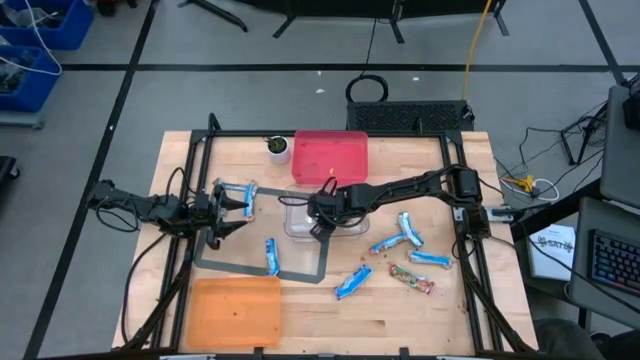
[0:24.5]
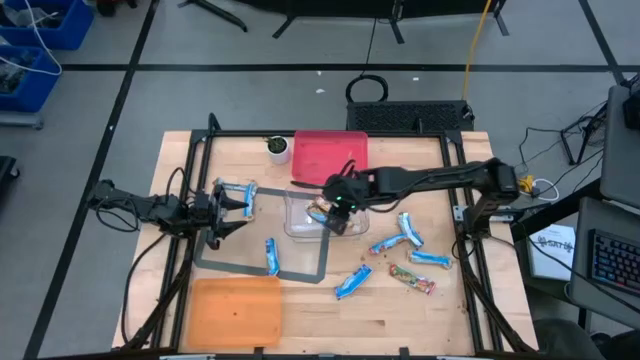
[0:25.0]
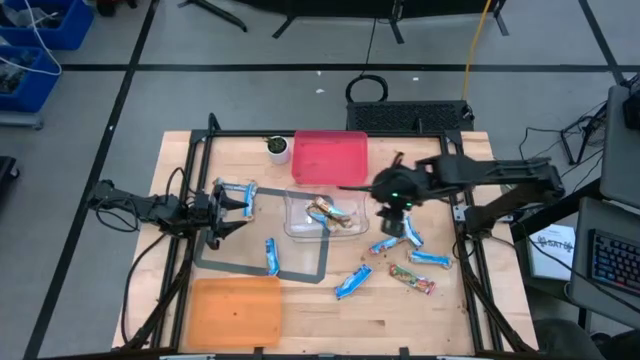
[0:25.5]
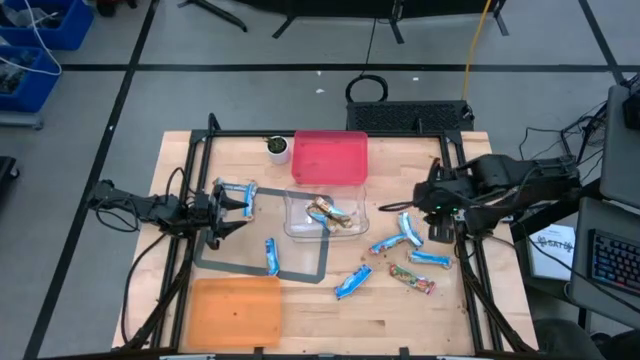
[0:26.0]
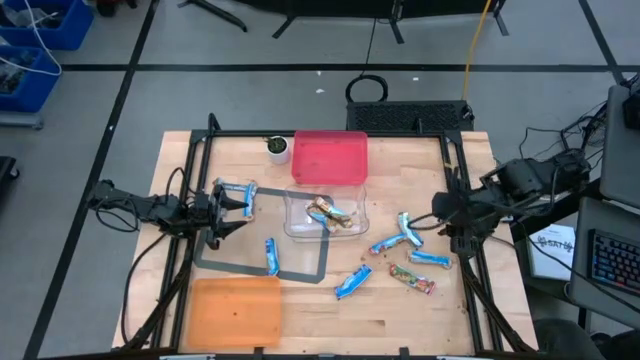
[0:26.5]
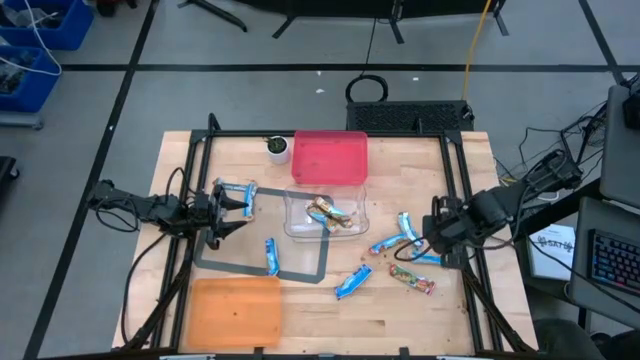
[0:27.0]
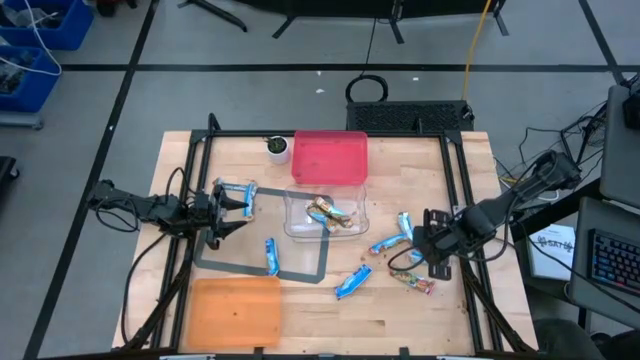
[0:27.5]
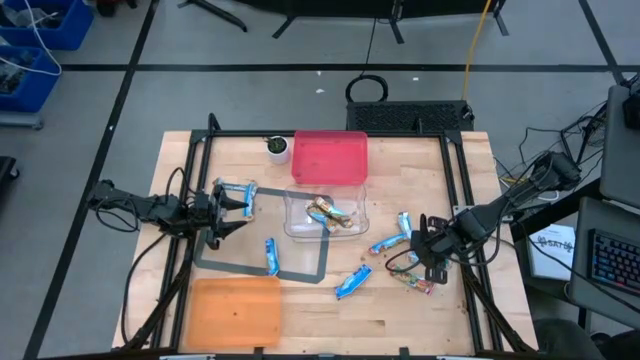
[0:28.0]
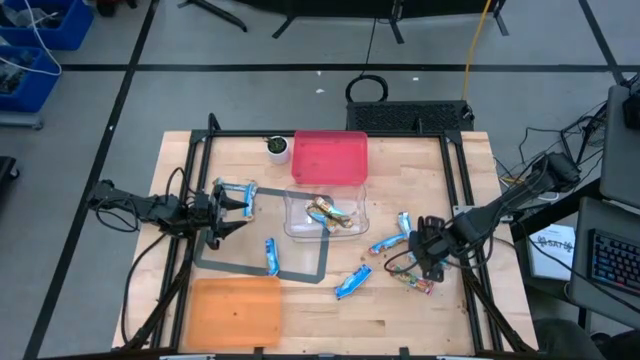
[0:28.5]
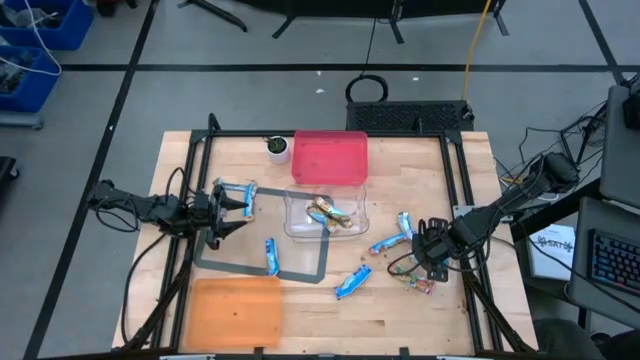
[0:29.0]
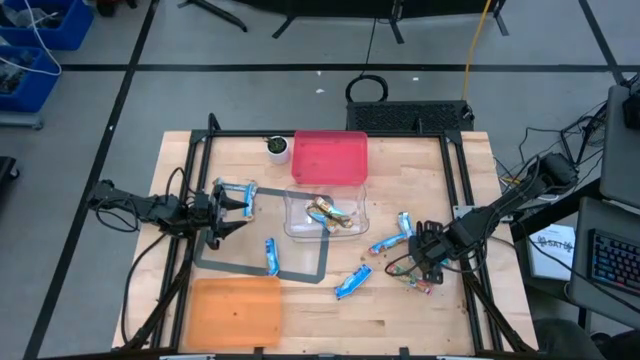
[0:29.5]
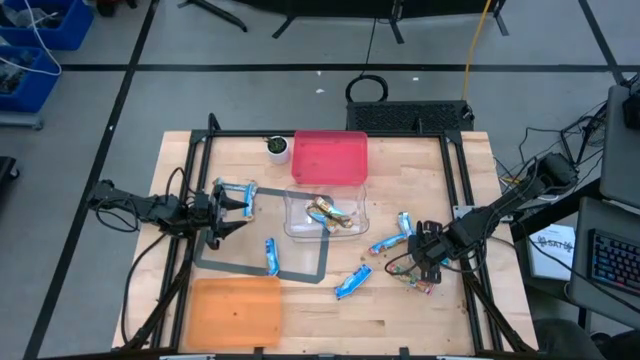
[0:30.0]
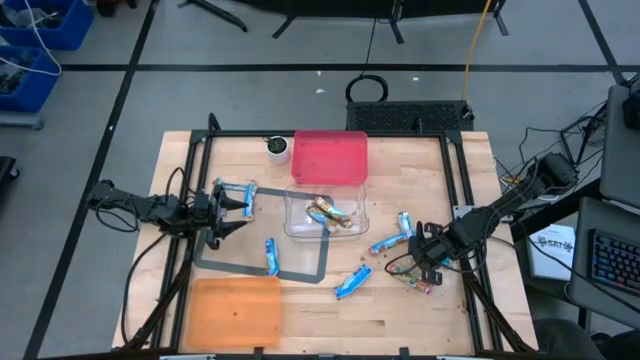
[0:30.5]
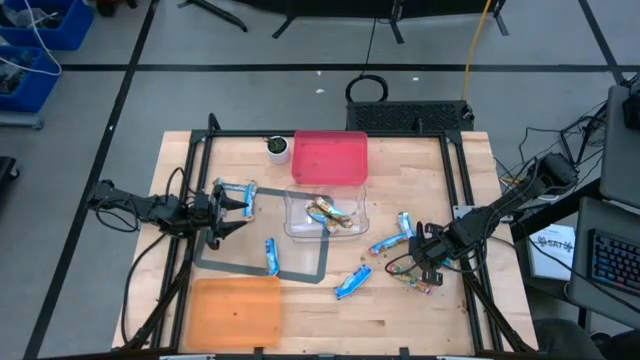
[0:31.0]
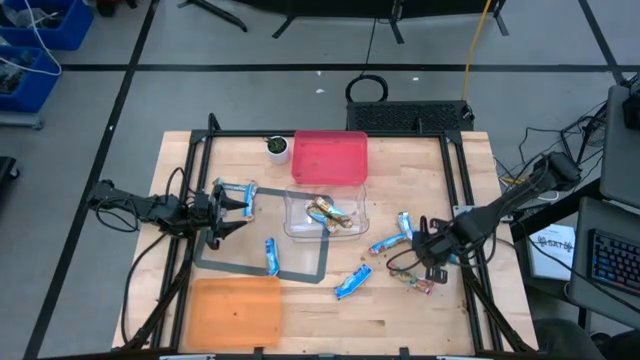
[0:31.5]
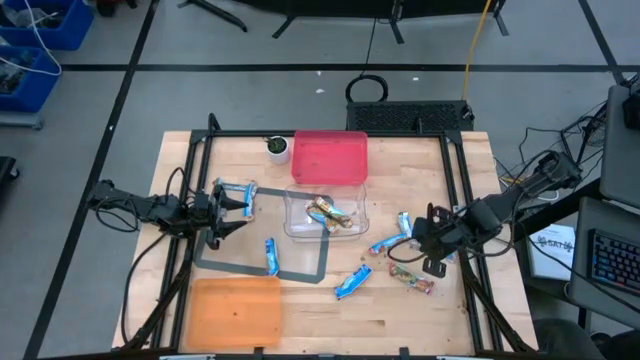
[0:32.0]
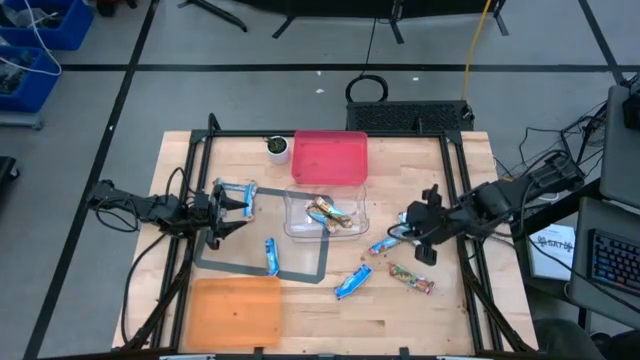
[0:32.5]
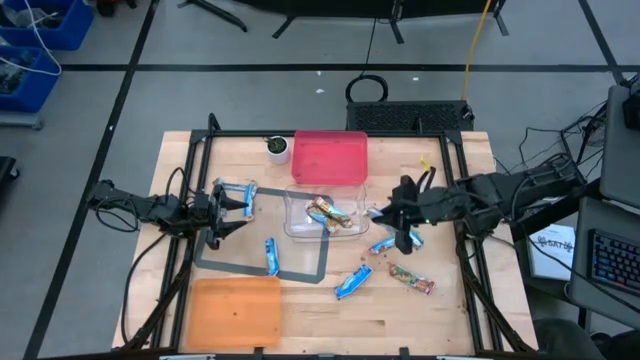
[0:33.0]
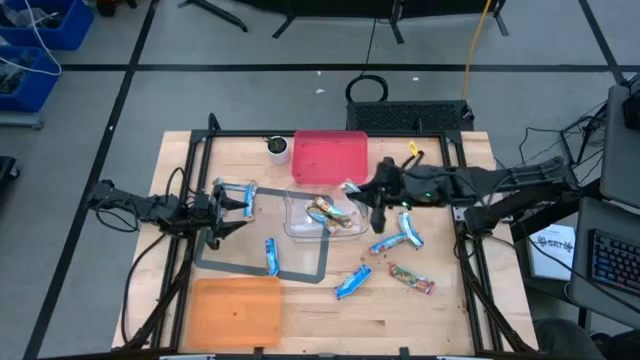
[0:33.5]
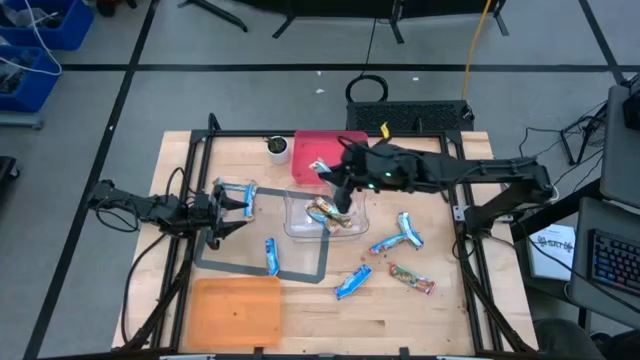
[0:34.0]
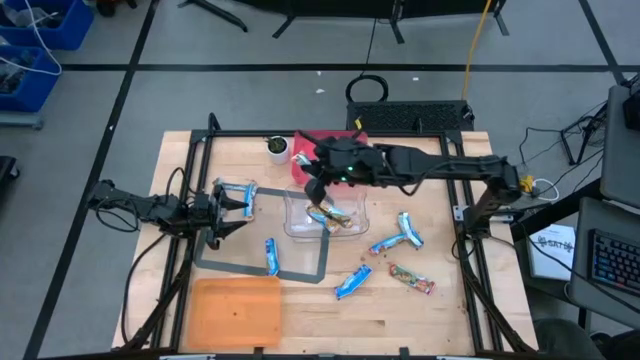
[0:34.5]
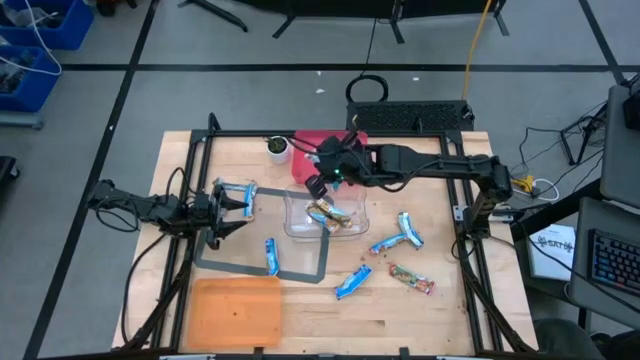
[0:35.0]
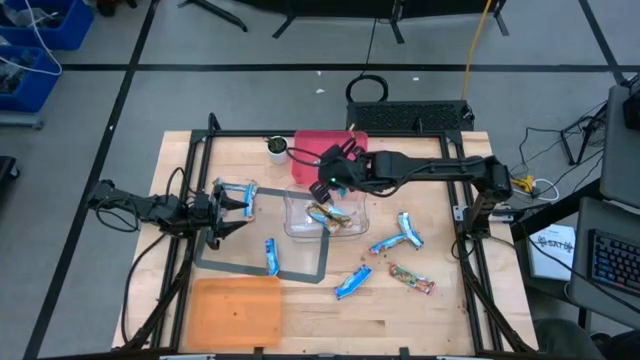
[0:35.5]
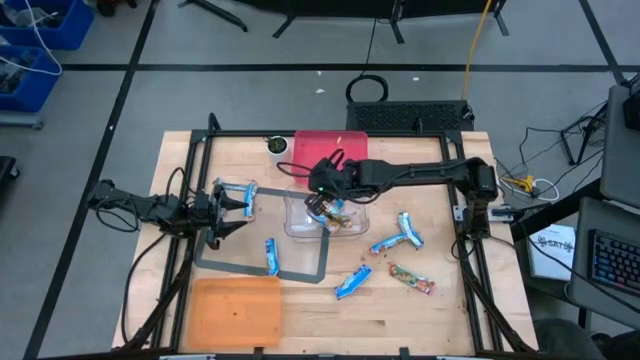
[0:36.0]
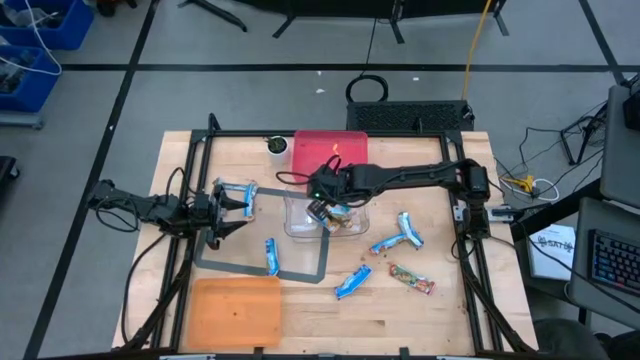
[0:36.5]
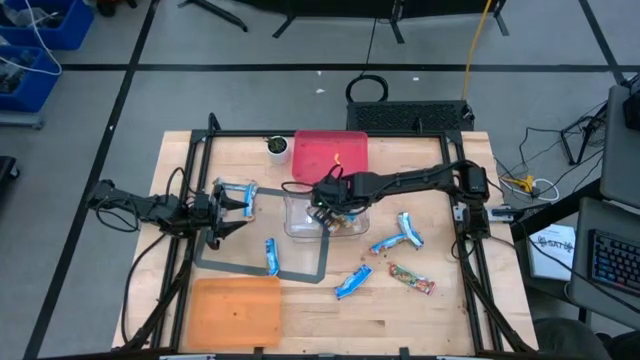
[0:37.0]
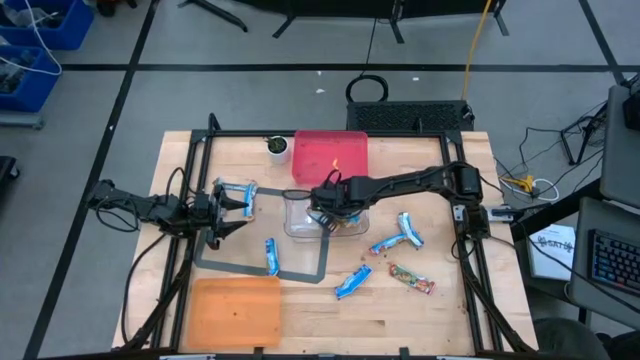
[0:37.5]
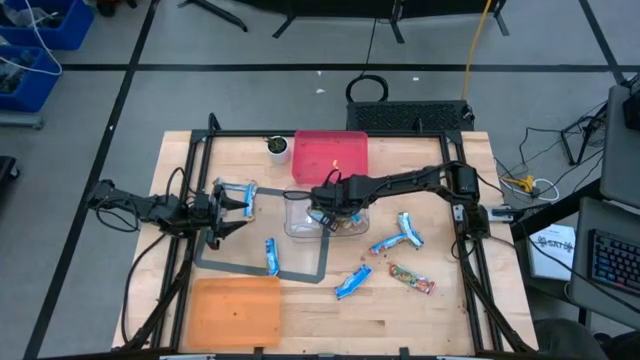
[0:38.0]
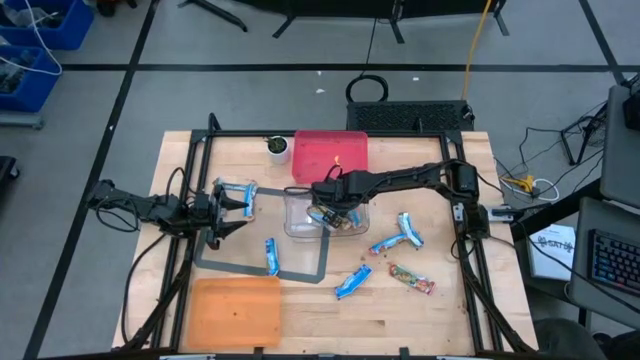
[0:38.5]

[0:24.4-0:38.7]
Task: Pick and place Granola Bars by type
Put the right yellow granola bar into the transparent bin

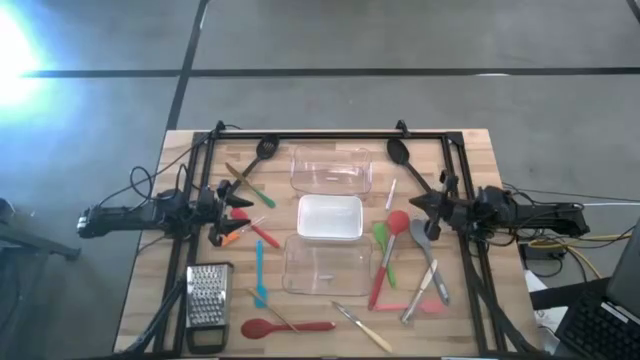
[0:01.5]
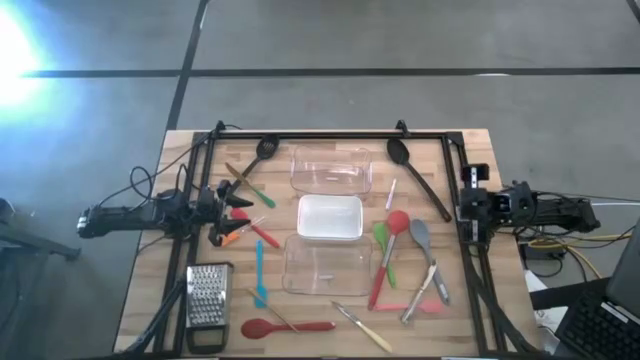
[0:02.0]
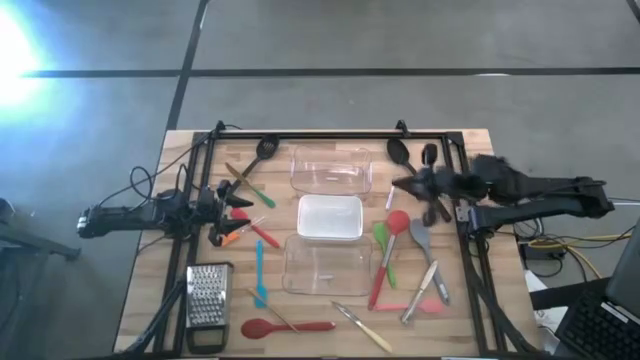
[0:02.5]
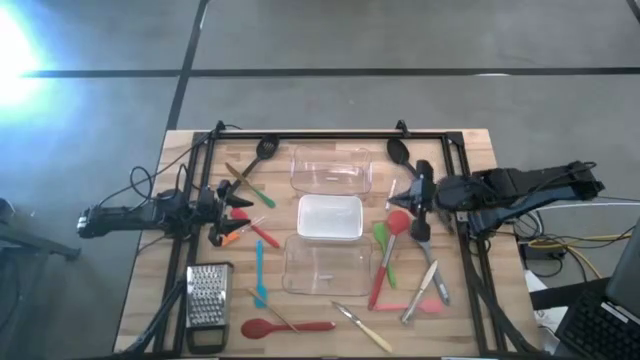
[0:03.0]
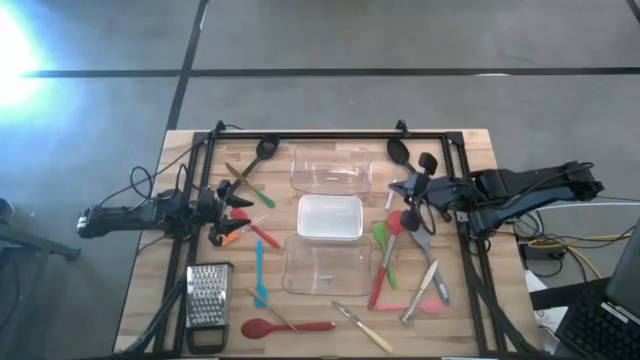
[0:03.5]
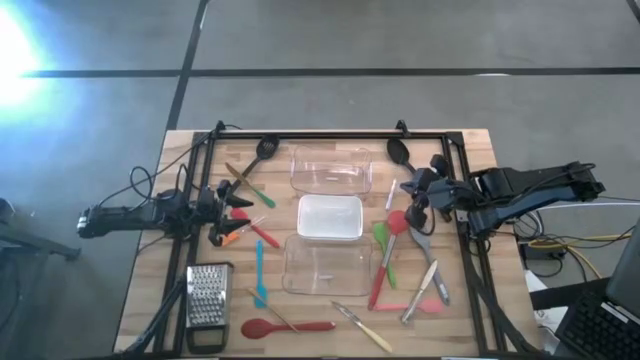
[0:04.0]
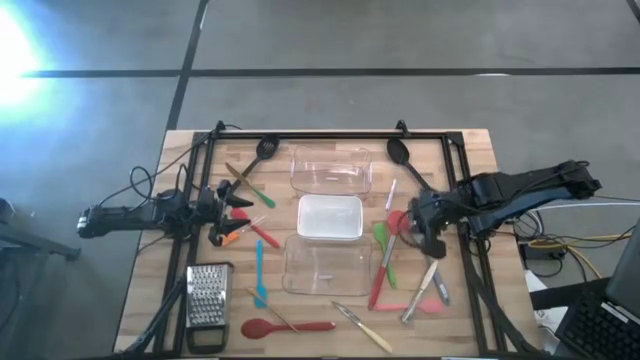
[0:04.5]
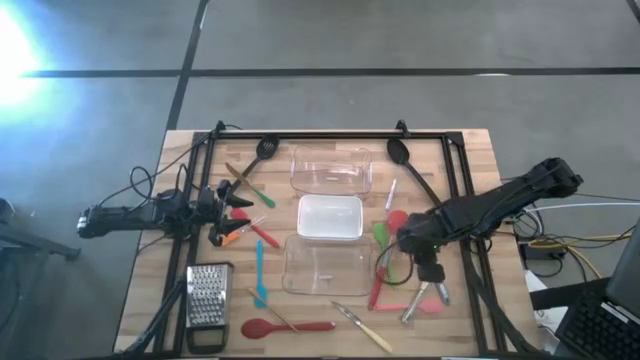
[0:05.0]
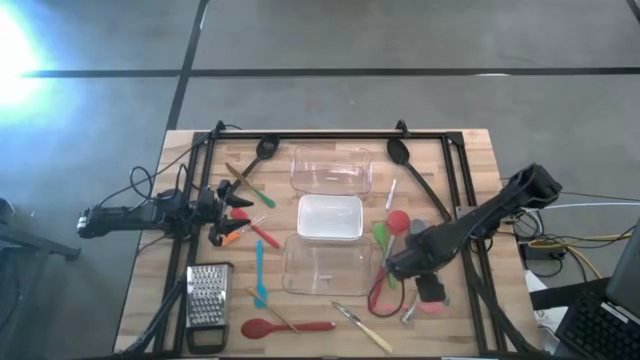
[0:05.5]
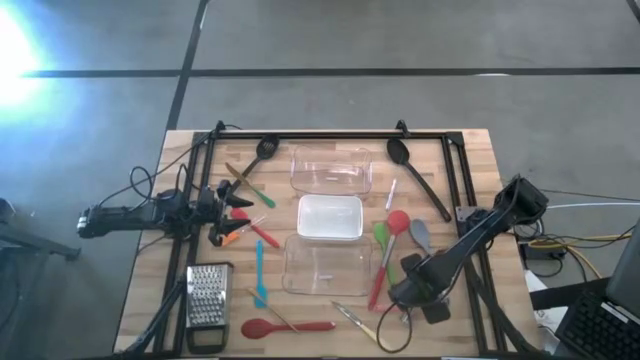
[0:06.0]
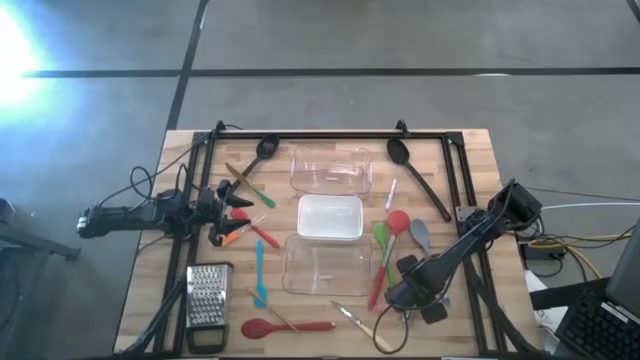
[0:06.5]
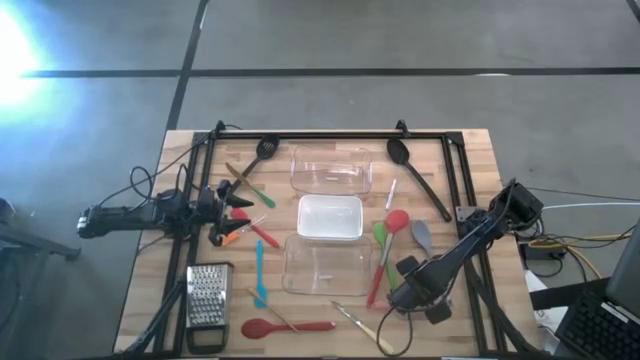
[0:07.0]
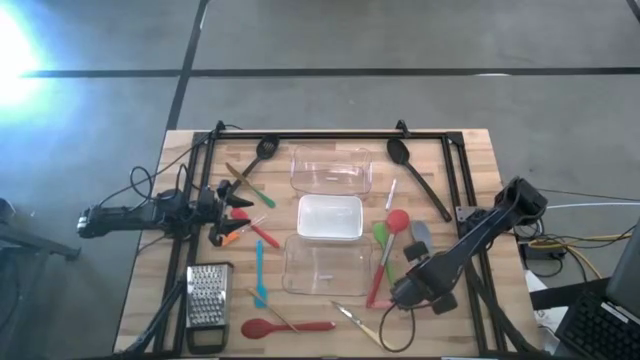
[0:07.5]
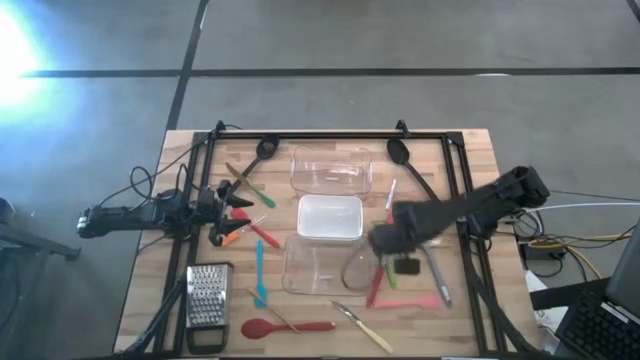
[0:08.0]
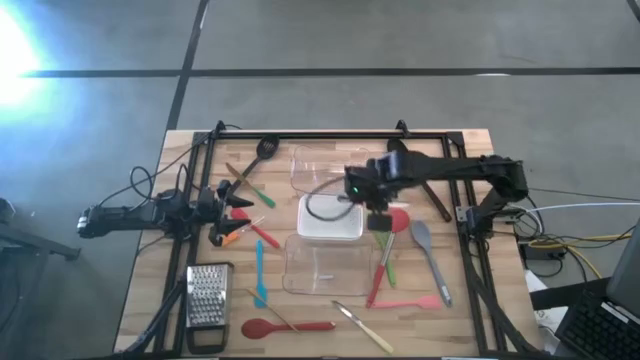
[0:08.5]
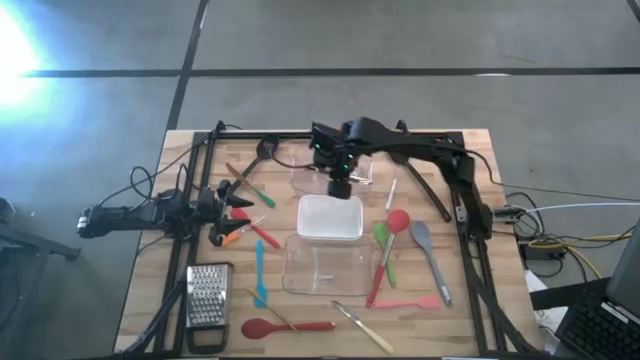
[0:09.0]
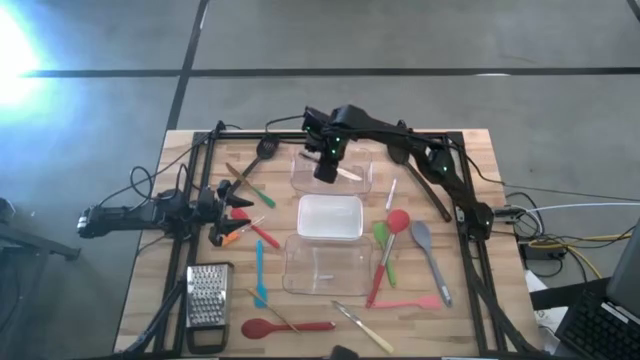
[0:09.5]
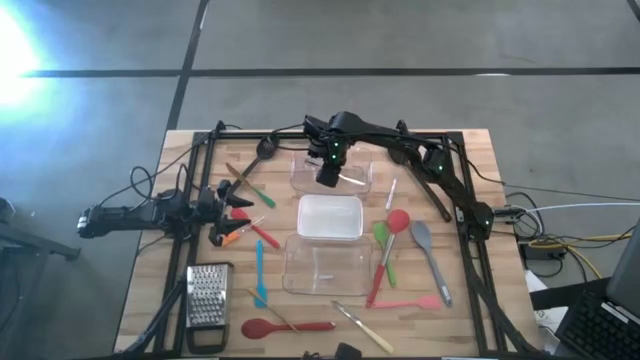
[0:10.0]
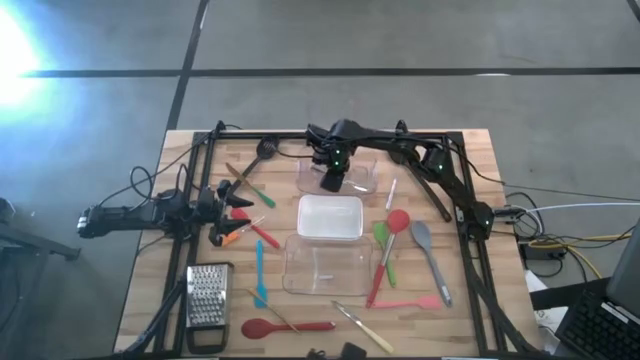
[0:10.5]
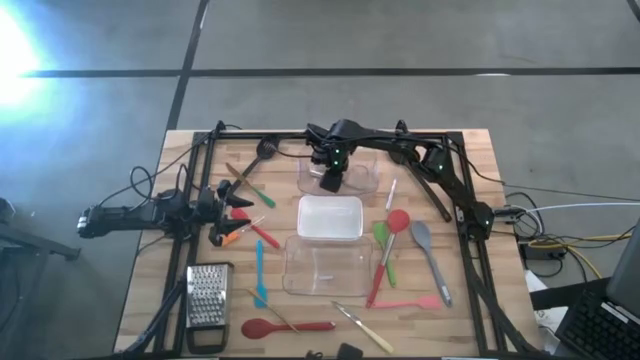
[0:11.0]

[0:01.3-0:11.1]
Task: Pick & Place Kitchen Items
Put the silver knife into the top transparent bin
